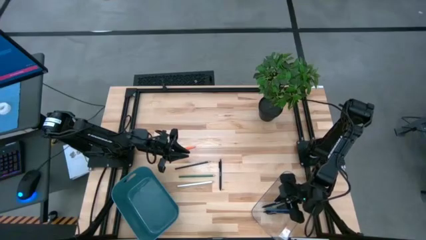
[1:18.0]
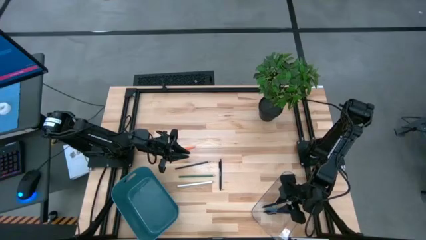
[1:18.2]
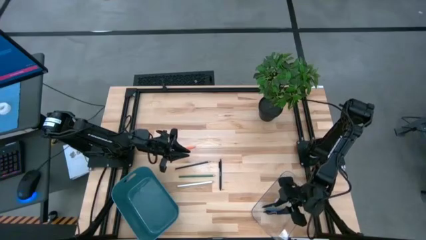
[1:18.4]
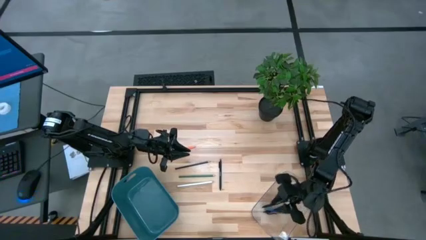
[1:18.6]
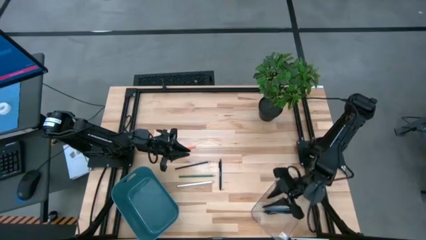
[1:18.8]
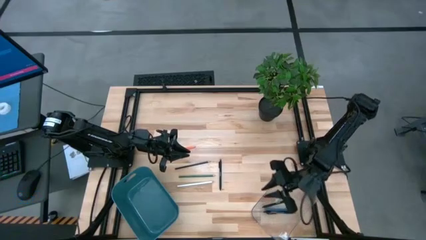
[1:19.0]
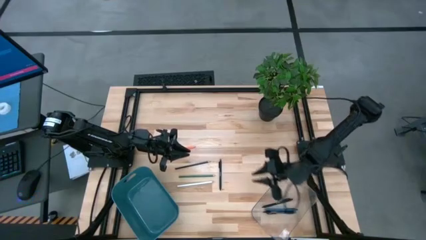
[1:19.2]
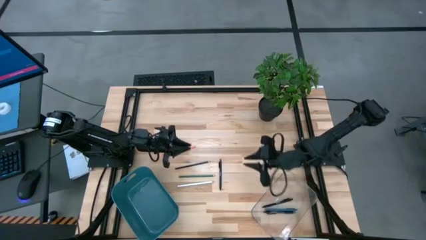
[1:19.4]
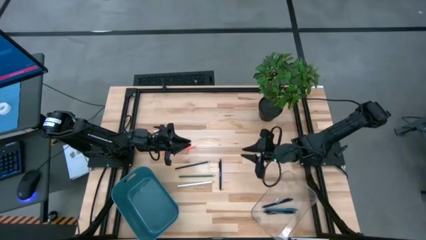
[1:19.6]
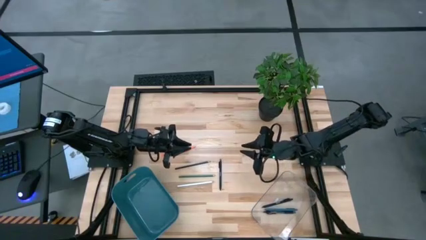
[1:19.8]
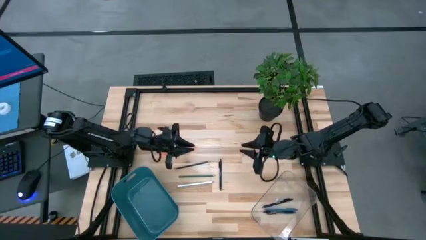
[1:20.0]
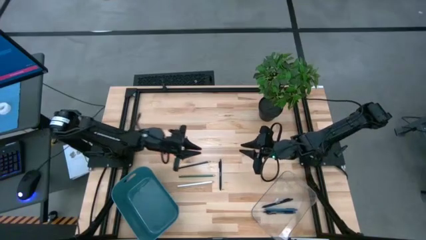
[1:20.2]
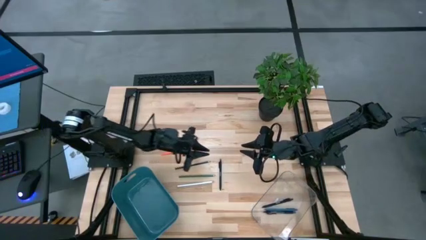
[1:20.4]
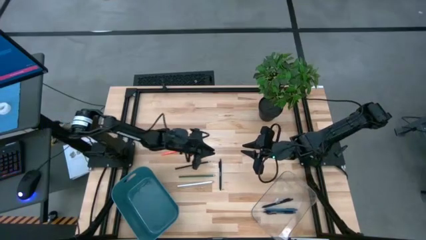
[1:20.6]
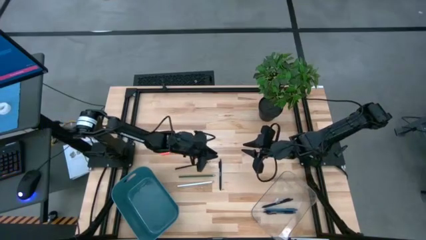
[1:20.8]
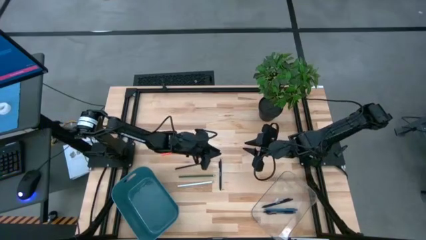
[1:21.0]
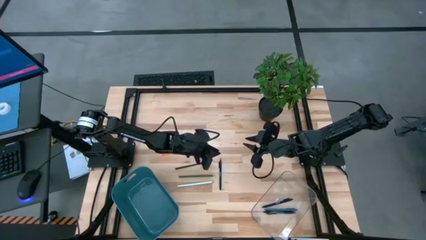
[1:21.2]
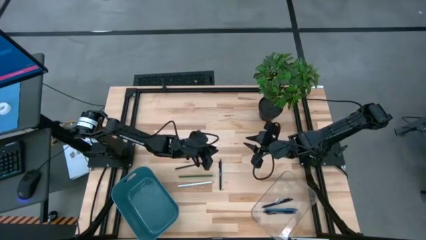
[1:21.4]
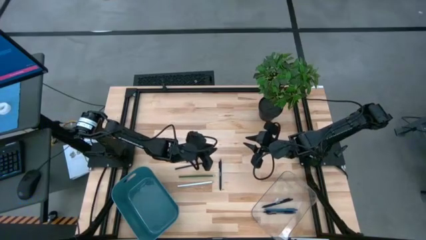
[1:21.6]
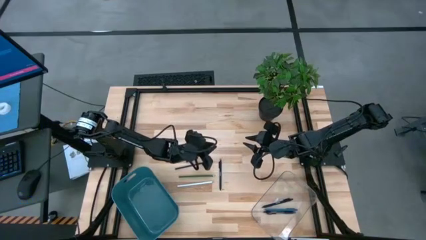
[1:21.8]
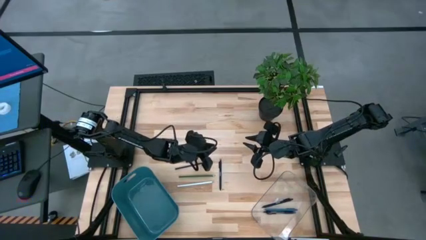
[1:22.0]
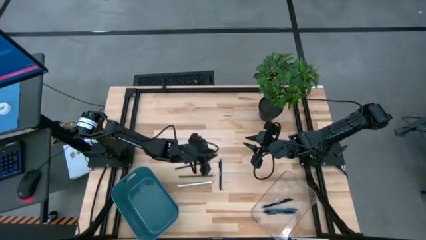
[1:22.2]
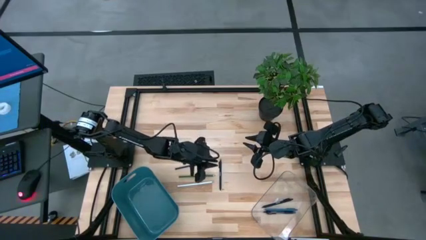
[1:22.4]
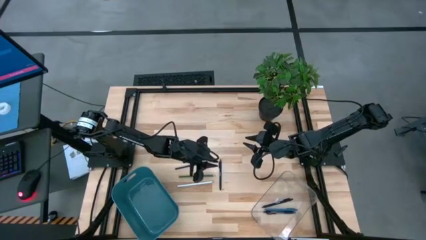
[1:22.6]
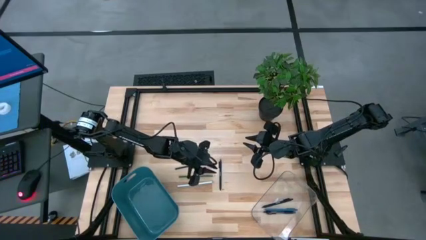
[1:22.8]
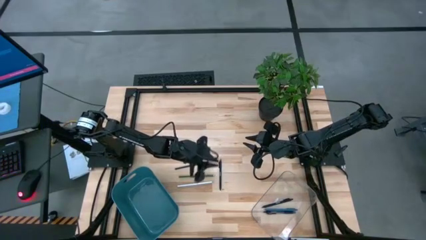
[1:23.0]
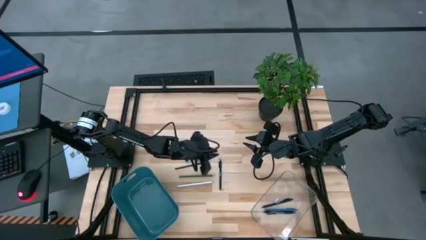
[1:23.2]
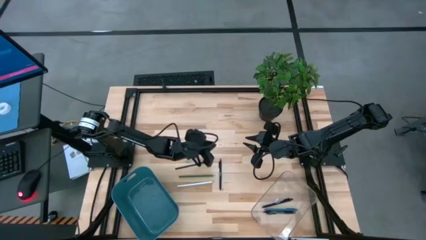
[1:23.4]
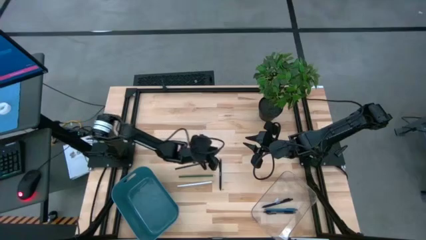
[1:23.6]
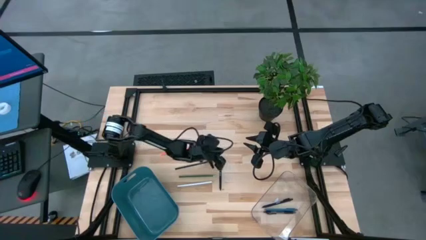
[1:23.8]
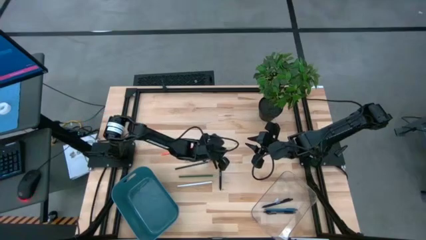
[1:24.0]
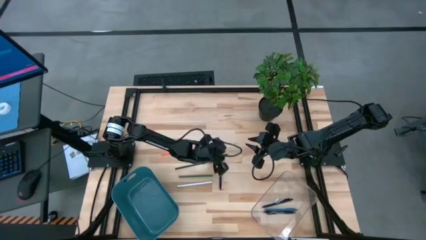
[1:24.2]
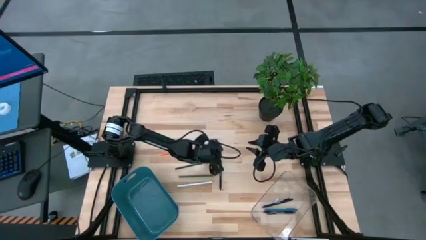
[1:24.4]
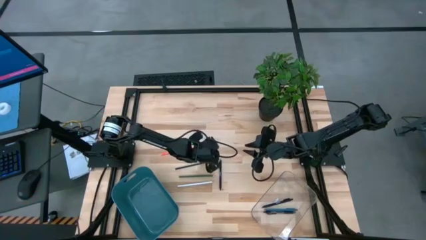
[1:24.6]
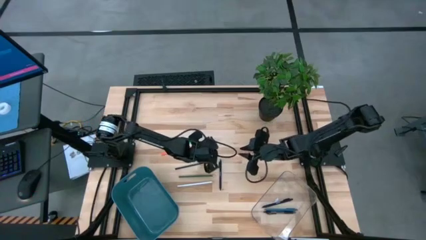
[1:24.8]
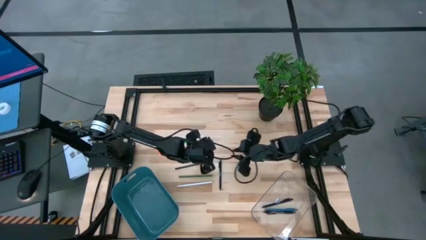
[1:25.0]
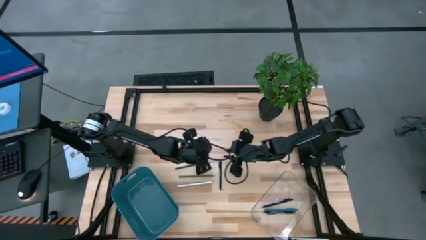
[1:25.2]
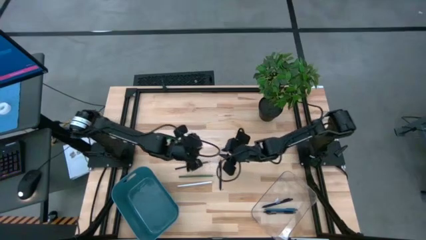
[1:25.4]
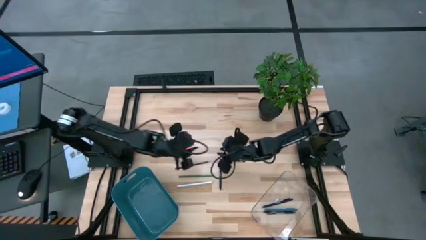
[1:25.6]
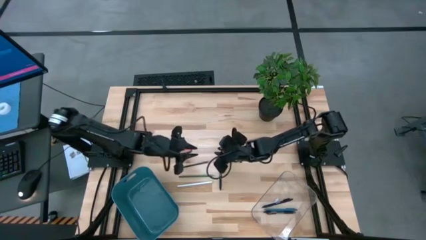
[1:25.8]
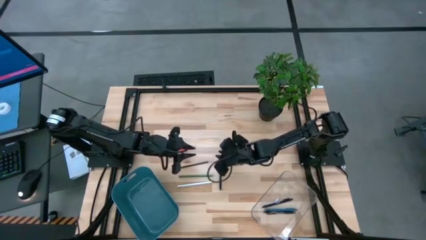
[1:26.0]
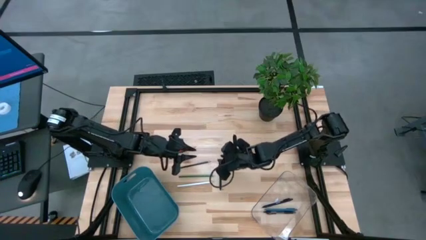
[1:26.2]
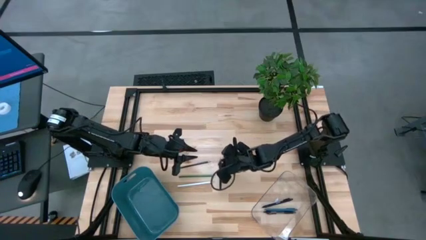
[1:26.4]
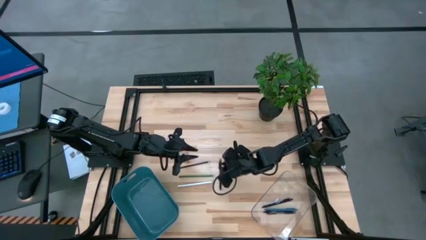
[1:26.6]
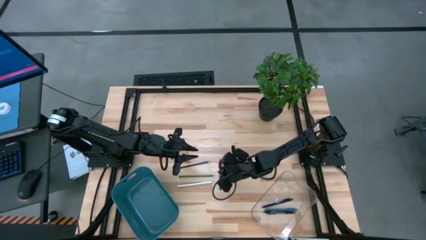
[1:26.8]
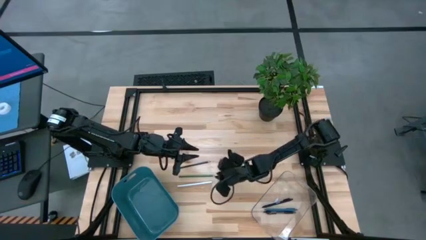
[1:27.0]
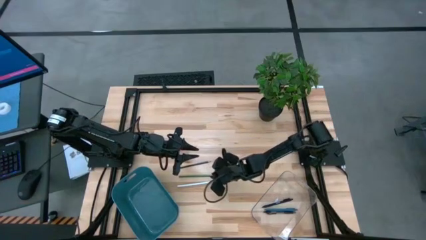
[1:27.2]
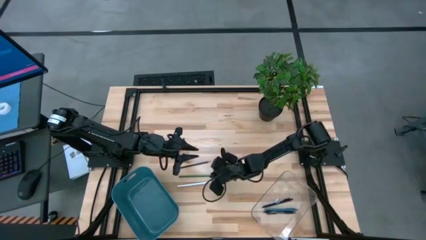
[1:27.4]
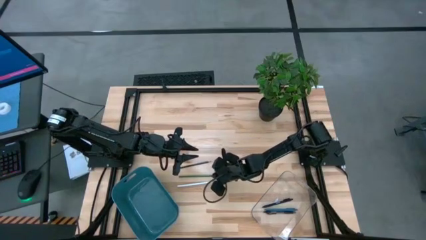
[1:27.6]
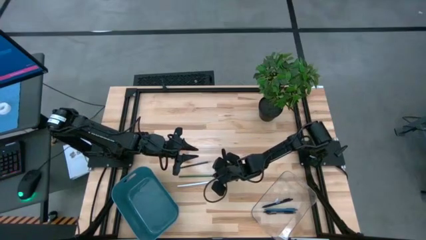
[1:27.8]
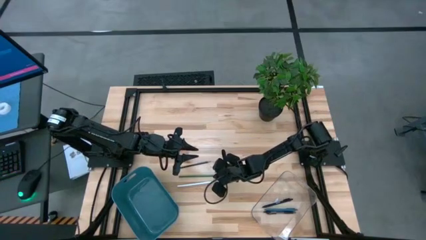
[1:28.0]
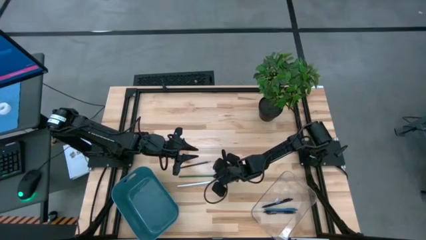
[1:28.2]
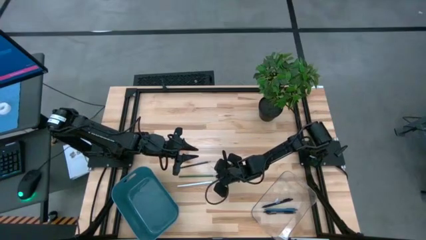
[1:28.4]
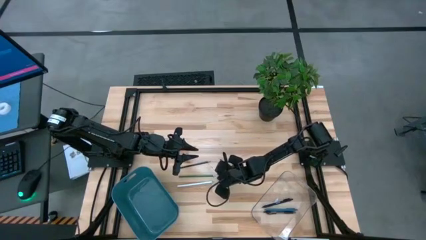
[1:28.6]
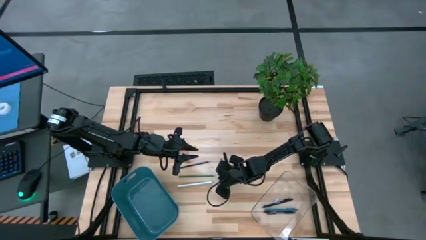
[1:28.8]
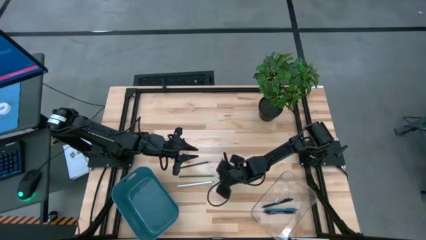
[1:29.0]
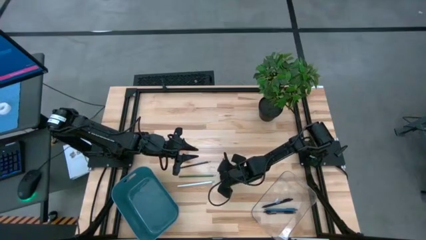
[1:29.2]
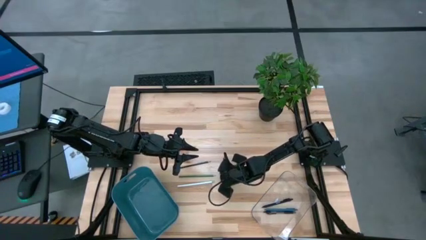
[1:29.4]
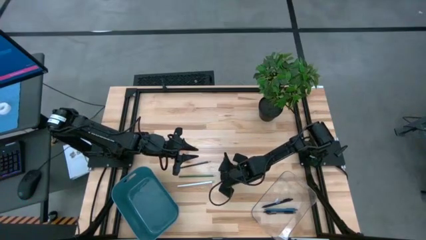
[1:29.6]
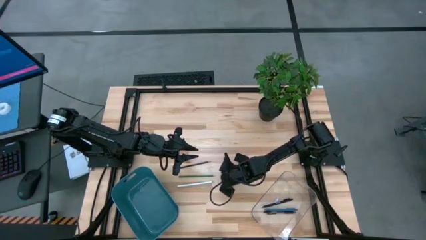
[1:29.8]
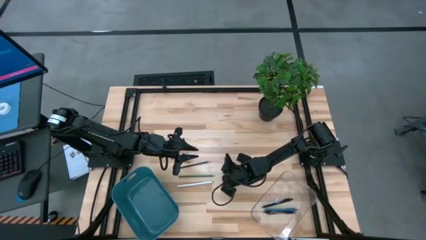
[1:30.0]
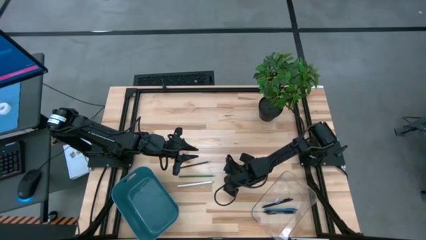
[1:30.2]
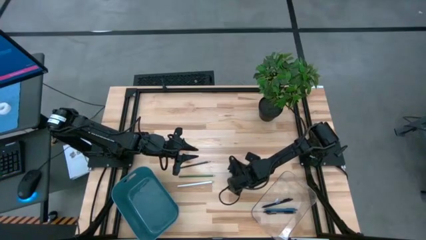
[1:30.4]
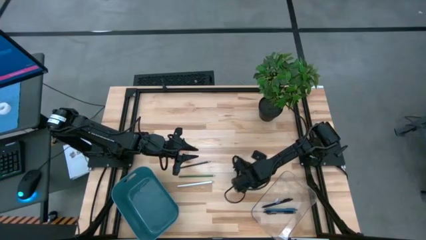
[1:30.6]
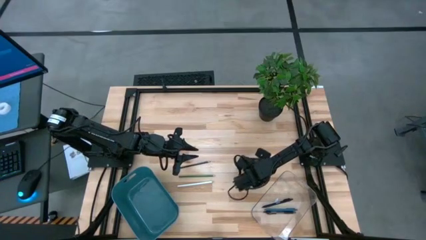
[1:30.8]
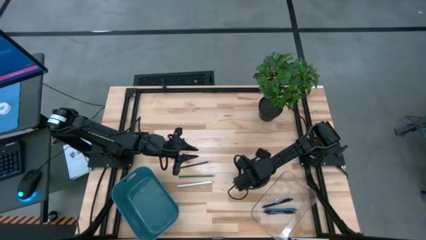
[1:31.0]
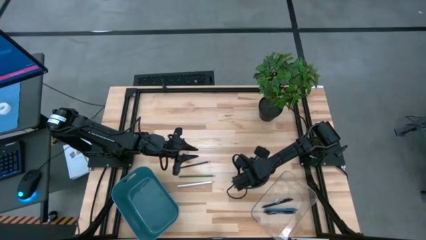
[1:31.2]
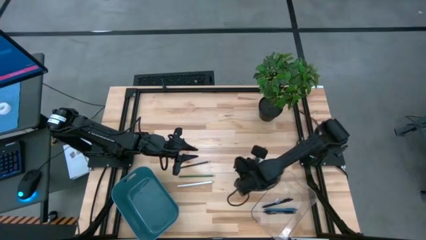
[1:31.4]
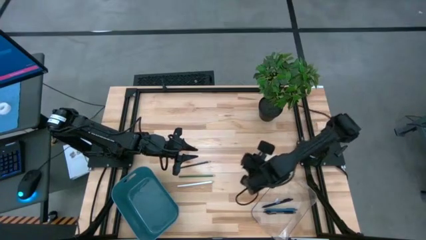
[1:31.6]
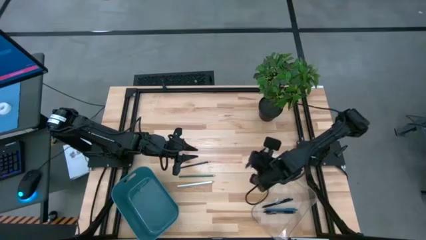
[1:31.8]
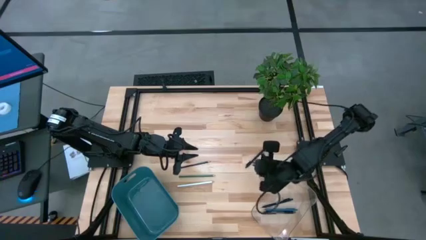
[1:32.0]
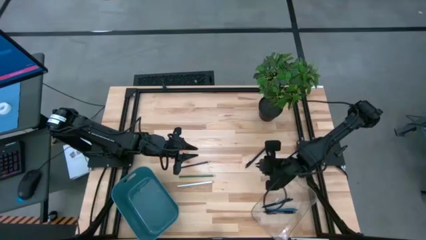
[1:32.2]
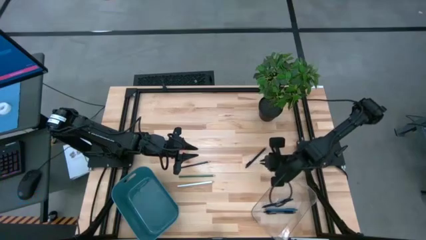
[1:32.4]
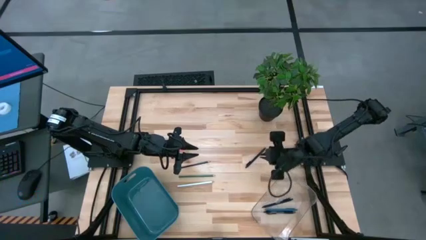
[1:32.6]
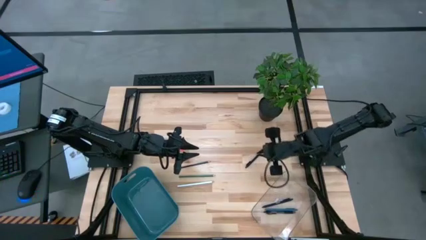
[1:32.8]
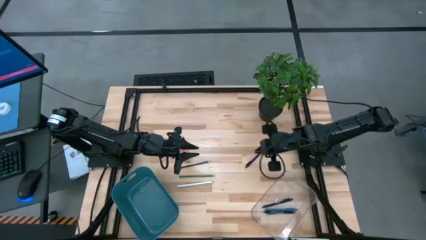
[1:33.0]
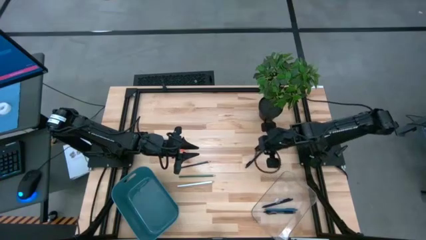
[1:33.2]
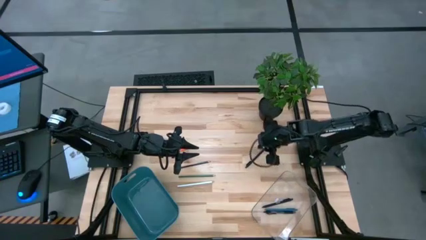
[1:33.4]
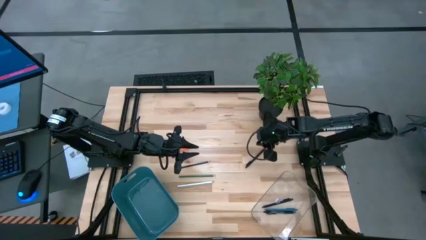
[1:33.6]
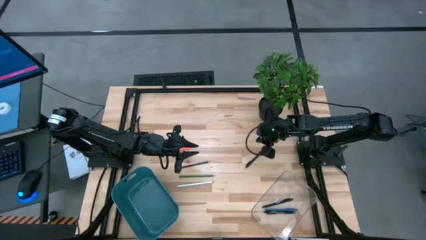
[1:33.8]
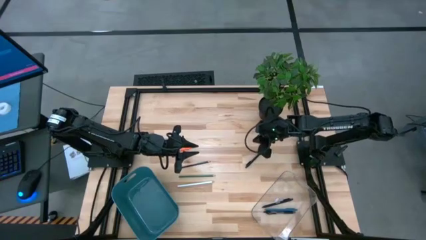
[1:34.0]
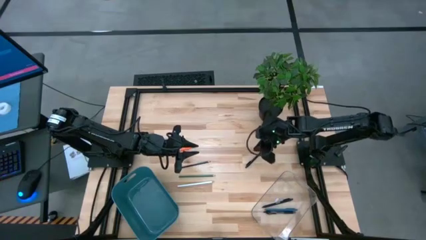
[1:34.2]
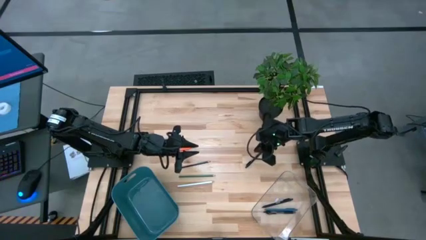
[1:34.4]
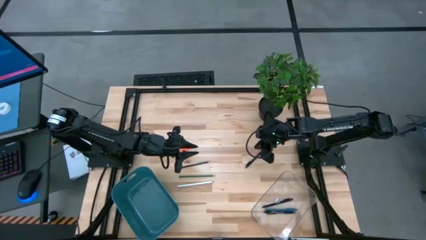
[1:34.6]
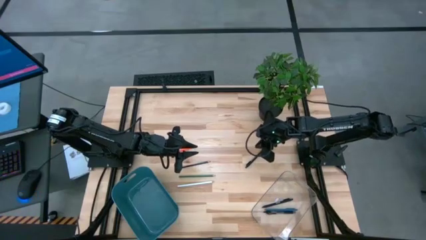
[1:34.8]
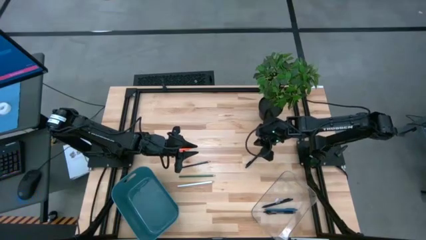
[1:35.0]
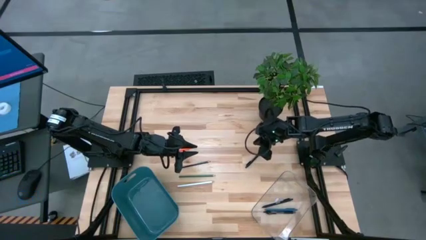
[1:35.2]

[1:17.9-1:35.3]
Task: Sort pens & pencils
Put the black pen in the transparent bin
